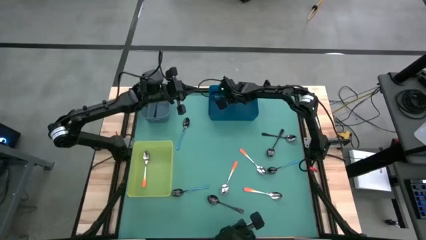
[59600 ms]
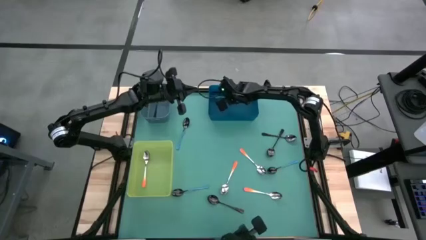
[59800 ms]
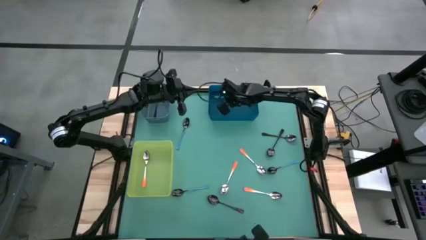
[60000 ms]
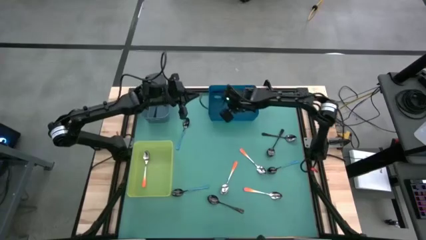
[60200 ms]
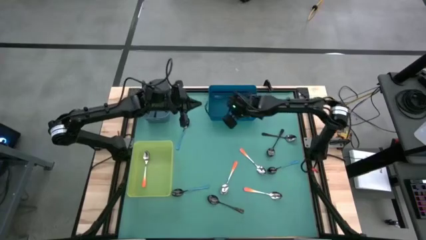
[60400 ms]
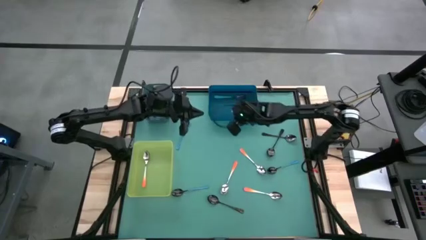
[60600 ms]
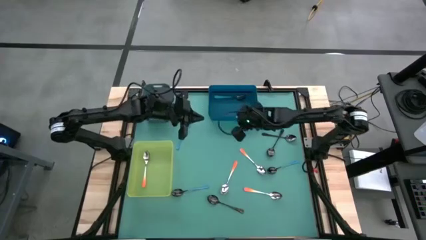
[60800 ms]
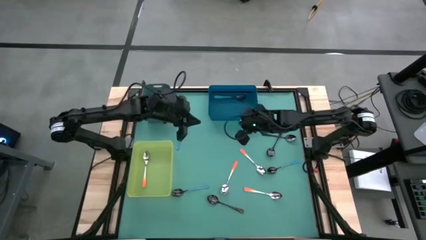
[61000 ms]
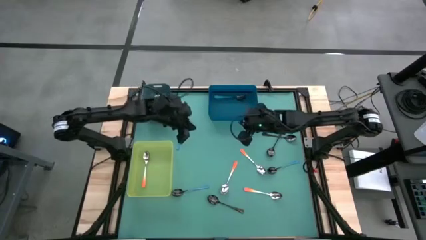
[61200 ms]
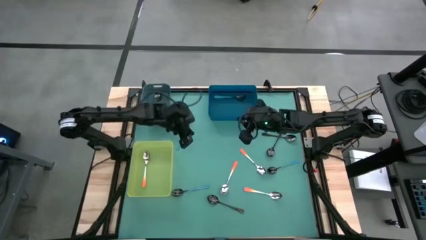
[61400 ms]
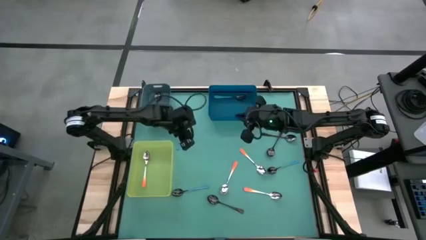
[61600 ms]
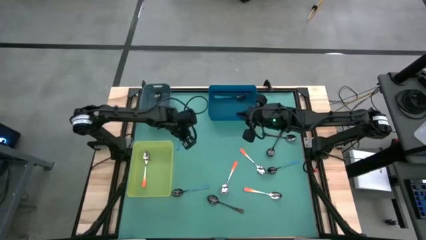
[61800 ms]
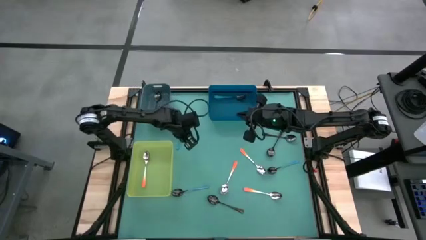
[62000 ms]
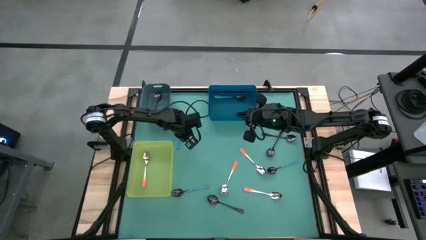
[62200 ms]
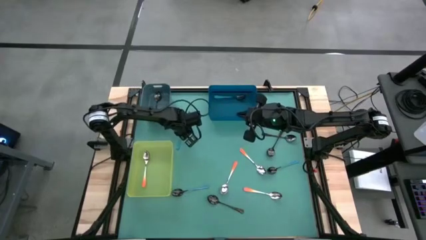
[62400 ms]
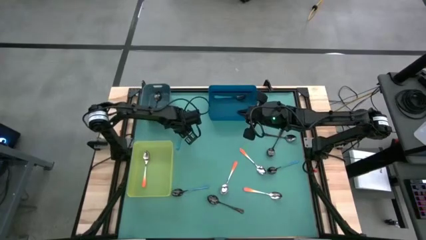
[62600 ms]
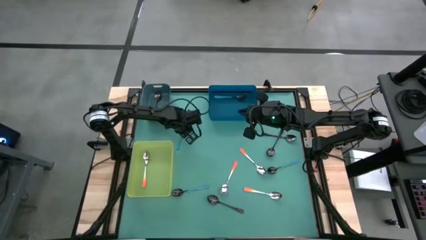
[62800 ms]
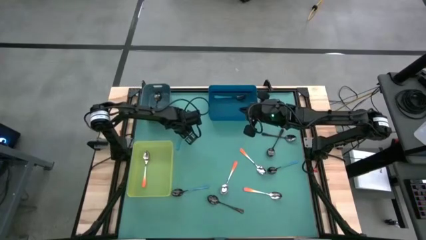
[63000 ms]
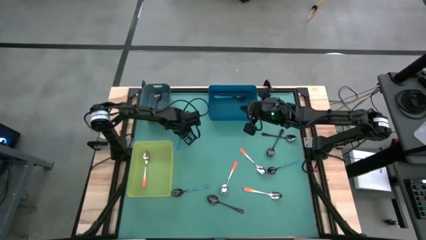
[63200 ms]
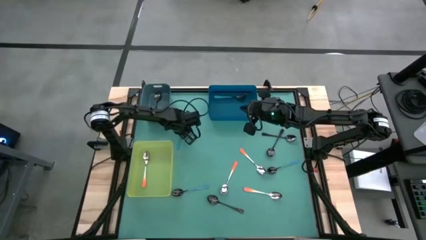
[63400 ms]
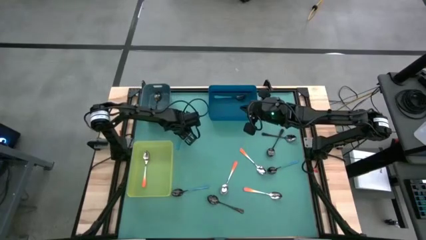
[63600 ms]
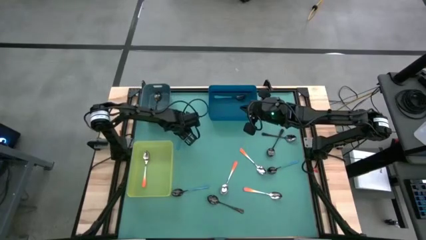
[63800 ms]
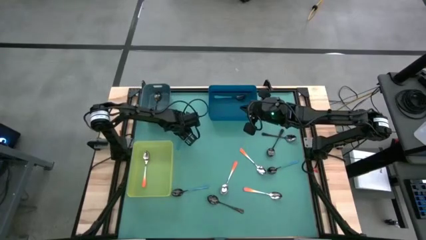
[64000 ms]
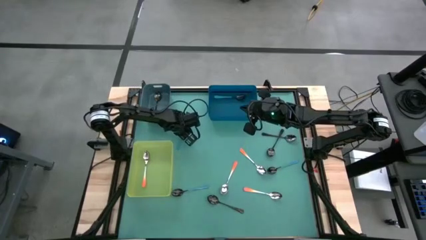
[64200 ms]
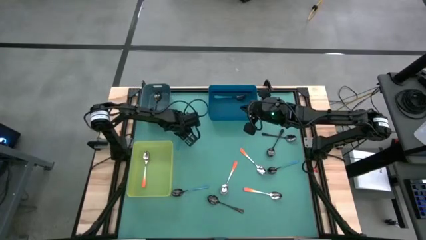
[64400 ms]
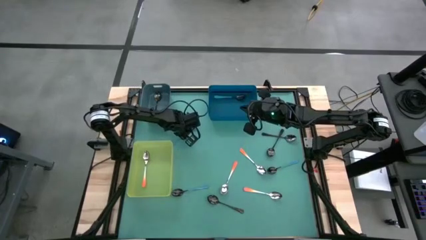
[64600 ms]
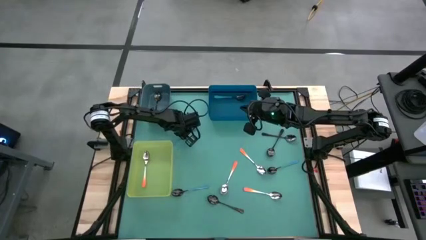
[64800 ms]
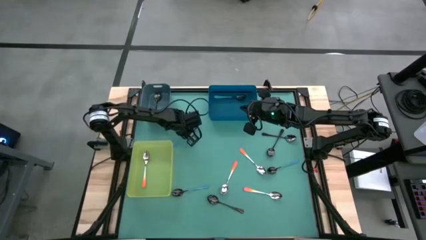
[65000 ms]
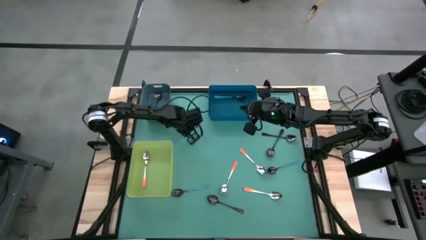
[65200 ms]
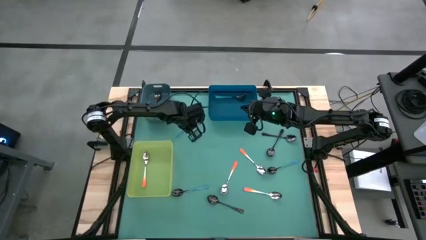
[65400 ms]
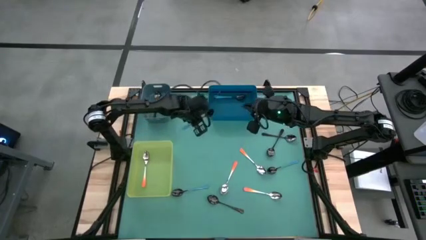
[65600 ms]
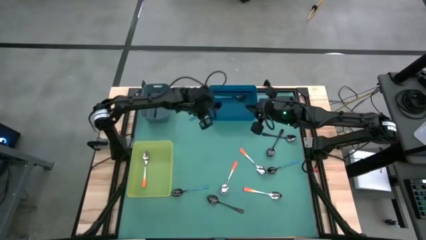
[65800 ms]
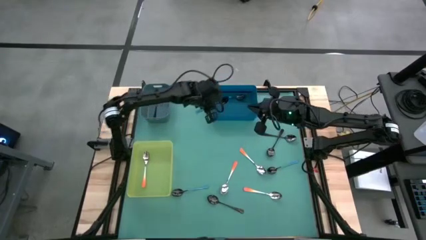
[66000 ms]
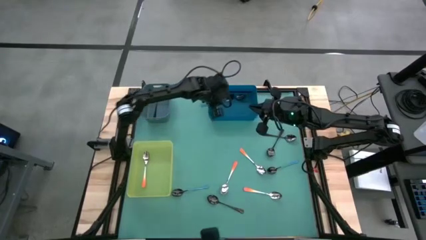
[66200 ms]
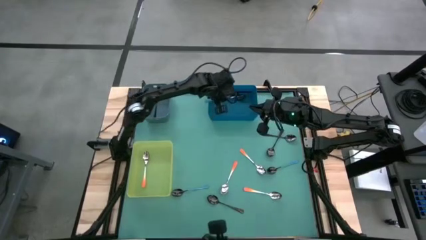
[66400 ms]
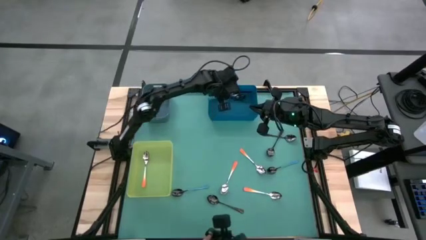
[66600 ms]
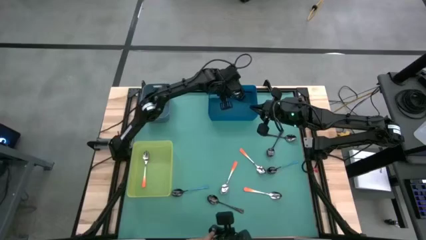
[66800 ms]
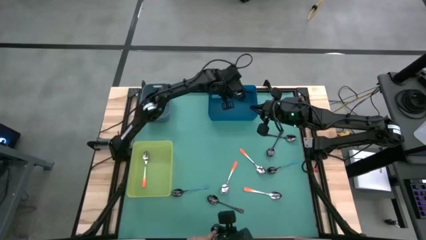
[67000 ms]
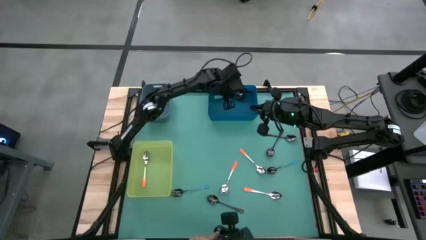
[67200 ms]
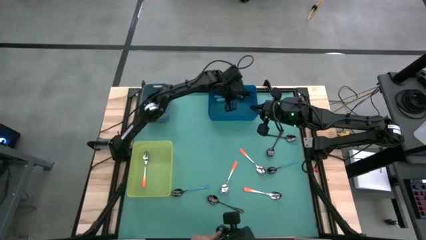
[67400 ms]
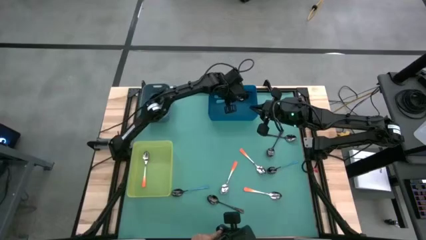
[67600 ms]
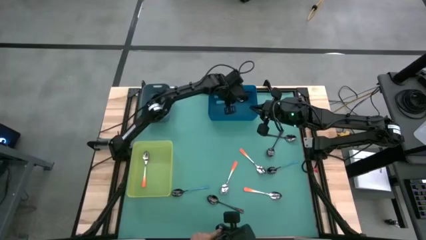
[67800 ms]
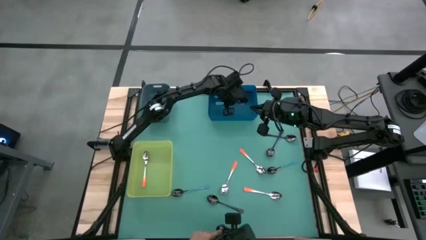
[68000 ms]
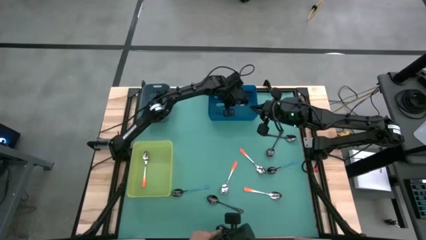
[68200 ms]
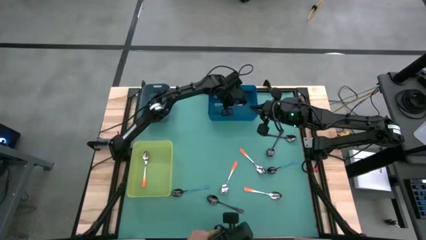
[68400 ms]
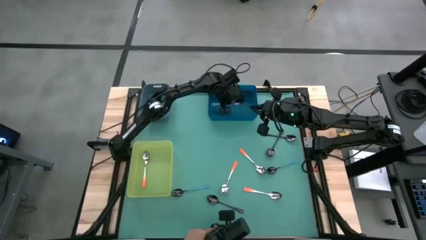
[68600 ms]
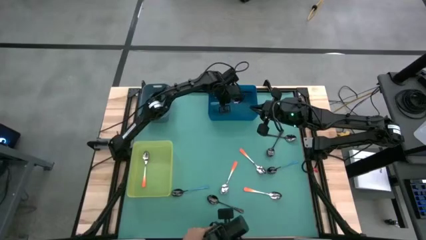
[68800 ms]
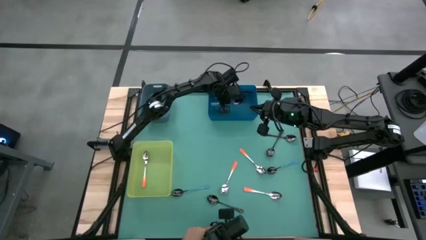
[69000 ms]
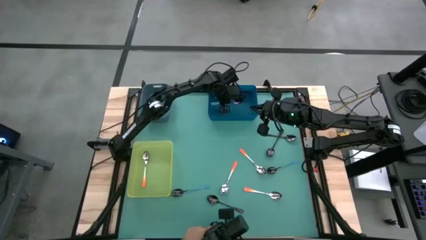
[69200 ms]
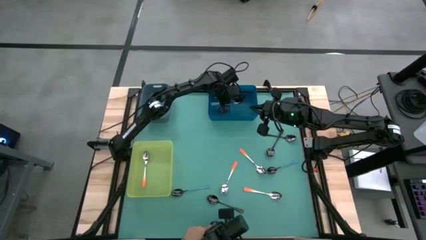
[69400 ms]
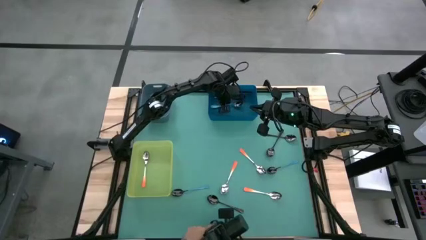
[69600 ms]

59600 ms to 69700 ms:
Task: Sort silverware by color (type)
Put the blue spoon into the dark blue bin

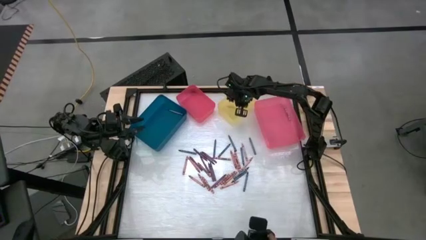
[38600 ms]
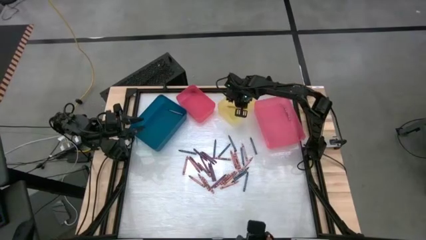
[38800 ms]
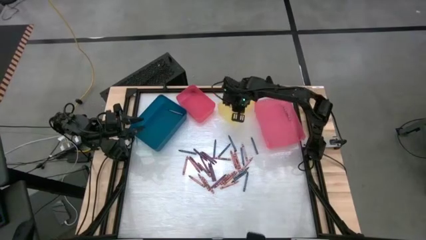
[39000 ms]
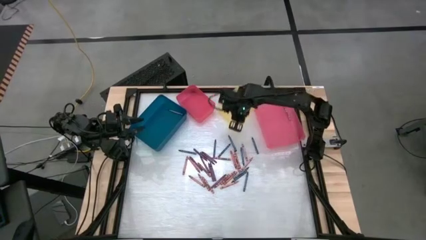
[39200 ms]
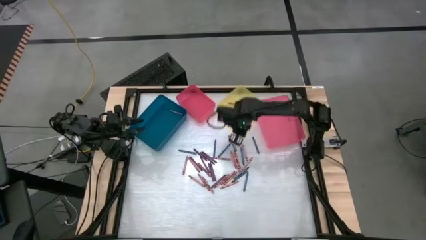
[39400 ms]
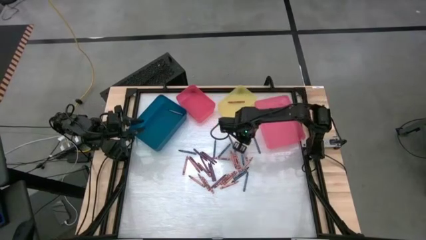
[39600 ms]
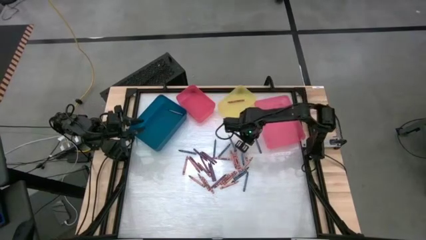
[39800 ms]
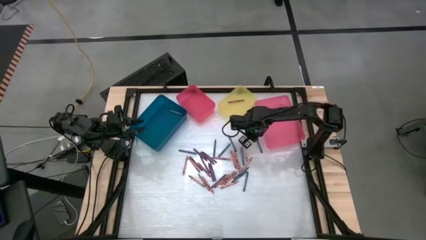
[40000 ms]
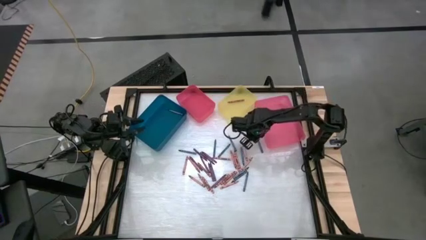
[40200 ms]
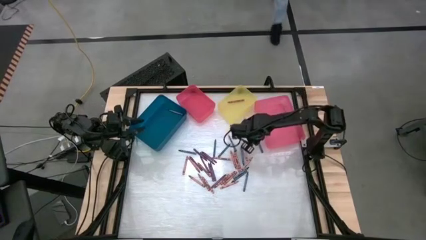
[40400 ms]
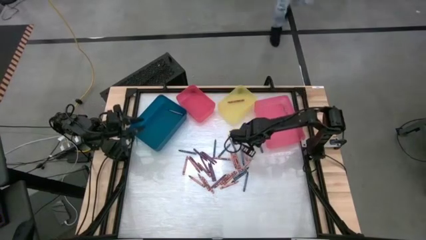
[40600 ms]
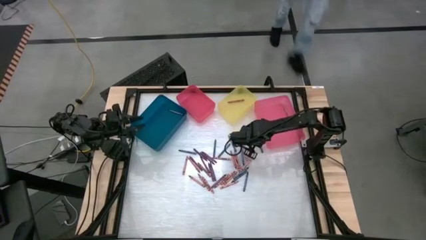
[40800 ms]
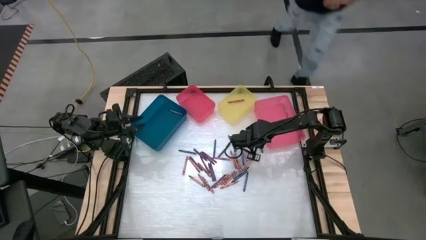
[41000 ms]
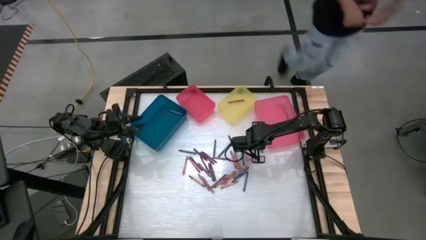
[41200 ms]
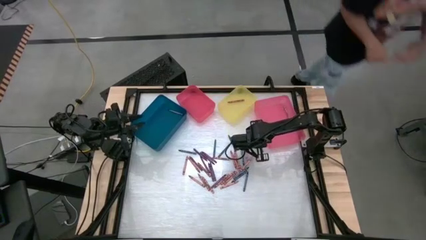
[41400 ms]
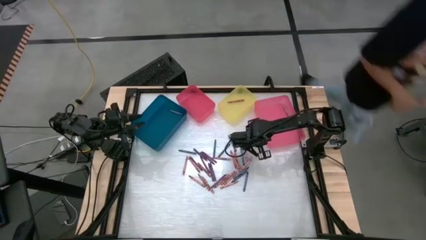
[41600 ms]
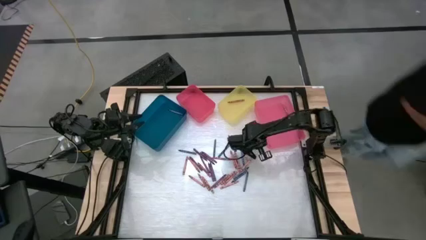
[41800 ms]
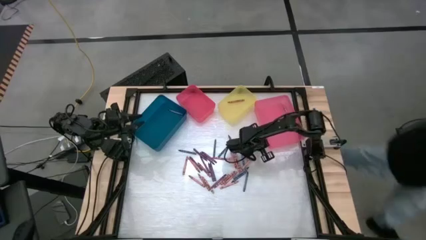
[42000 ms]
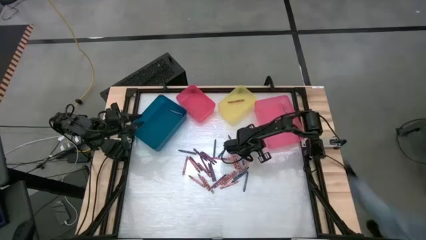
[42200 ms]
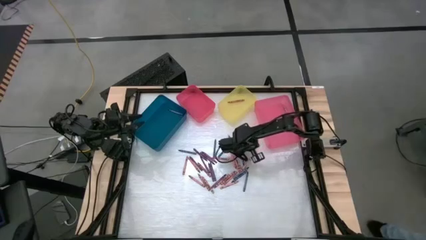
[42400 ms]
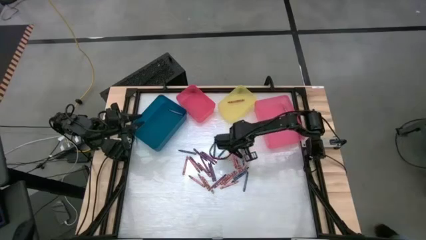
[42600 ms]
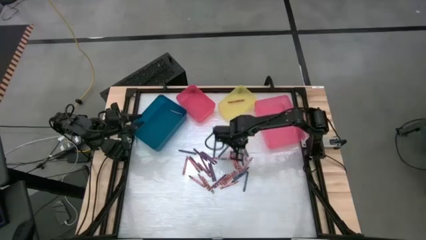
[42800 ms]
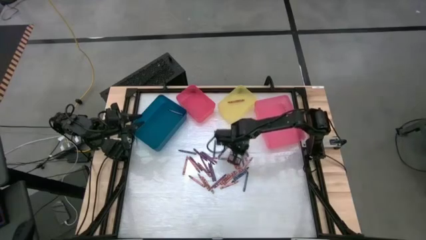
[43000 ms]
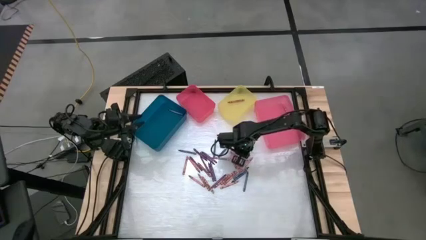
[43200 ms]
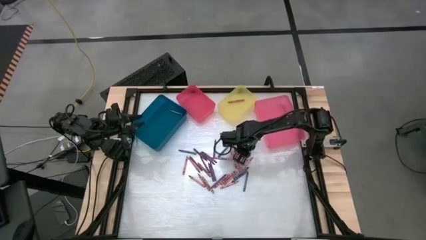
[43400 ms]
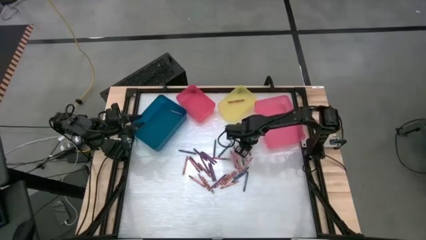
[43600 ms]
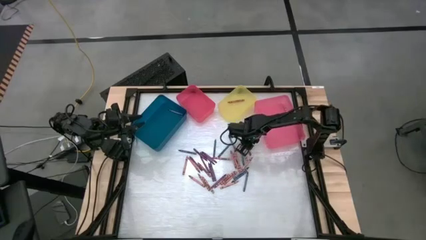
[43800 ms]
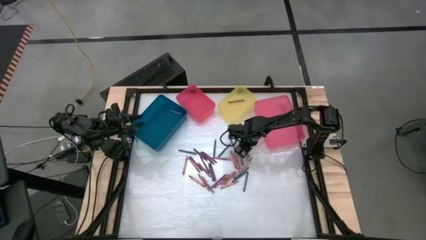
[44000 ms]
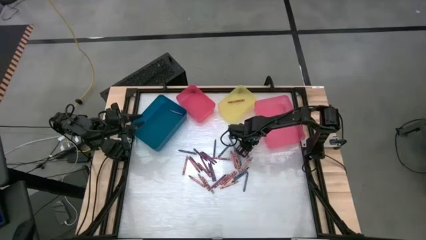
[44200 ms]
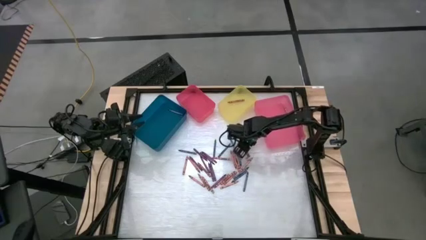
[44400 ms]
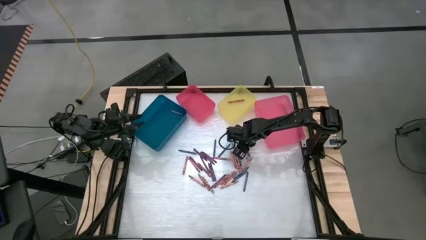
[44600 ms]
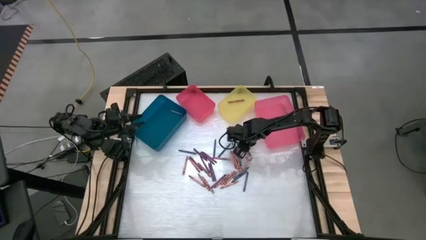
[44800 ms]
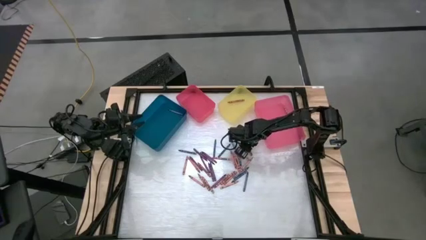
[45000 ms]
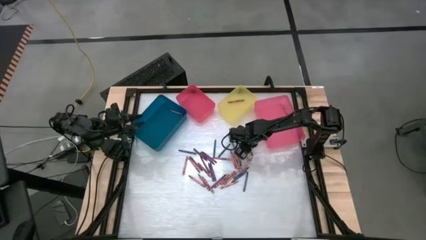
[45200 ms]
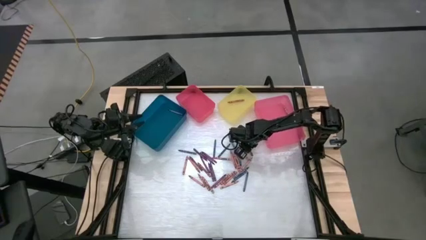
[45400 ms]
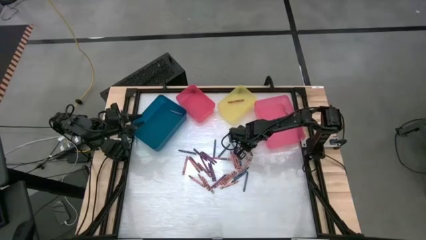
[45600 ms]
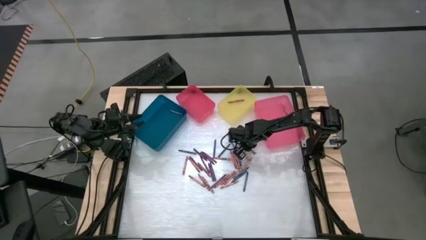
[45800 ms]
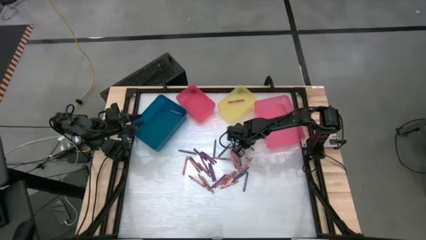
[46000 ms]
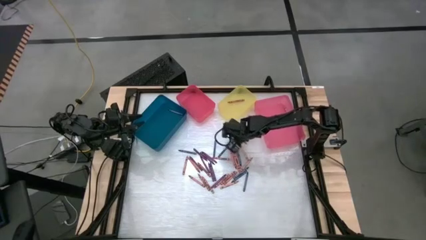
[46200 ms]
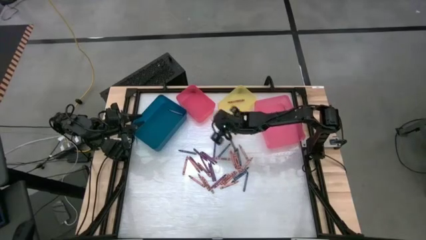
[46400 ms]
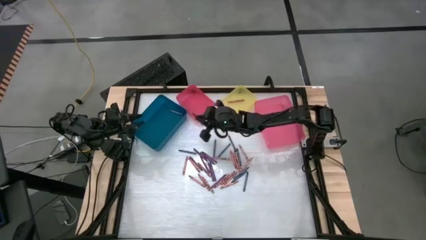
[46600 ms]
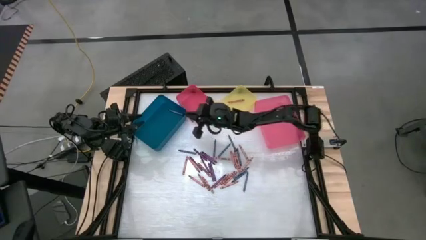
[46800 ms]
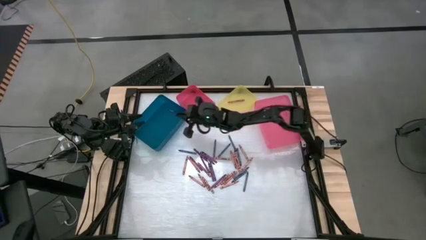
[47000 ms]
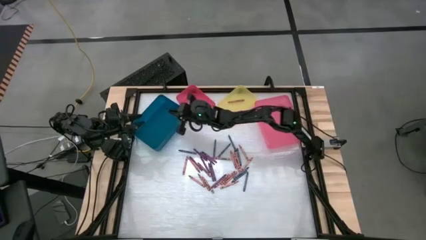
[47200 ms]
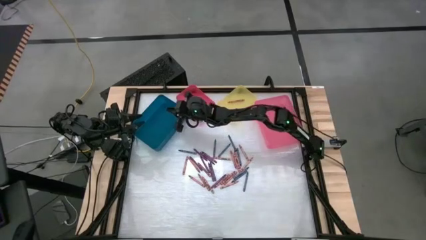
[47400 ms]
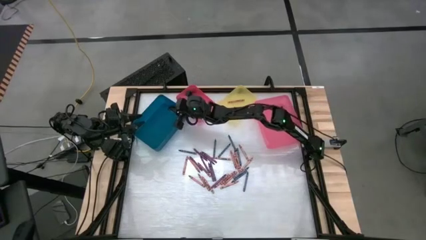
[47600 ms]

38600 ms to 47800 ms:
Task: Sort crayons
Put the blue crayon into the blue bin
